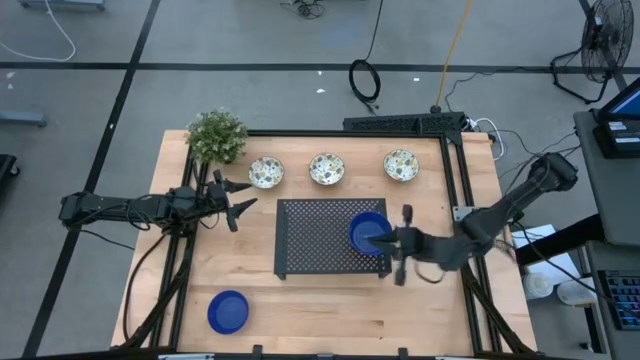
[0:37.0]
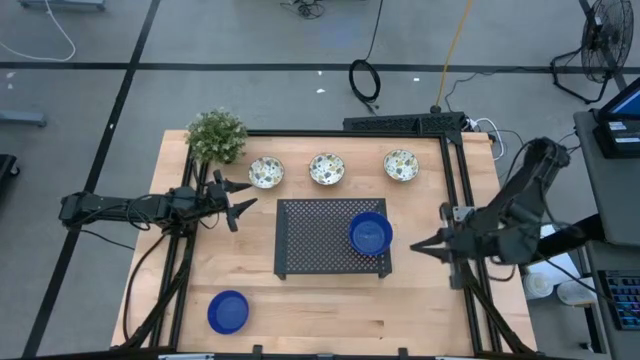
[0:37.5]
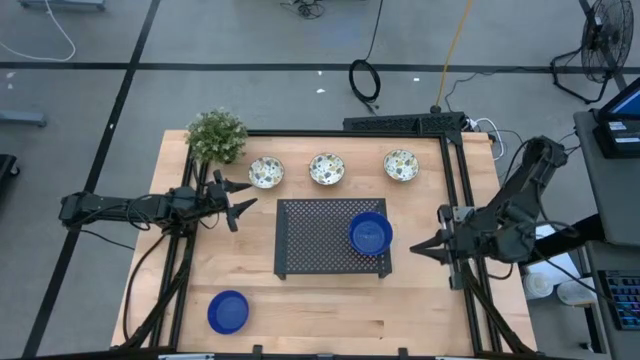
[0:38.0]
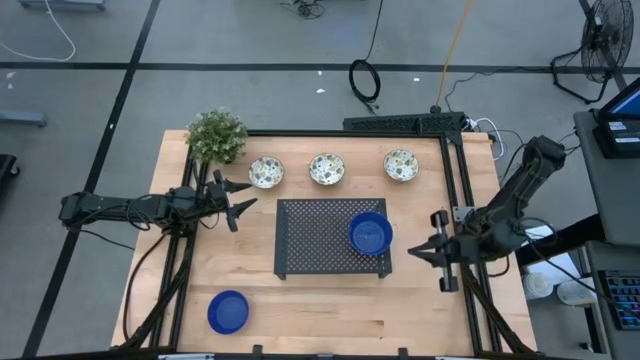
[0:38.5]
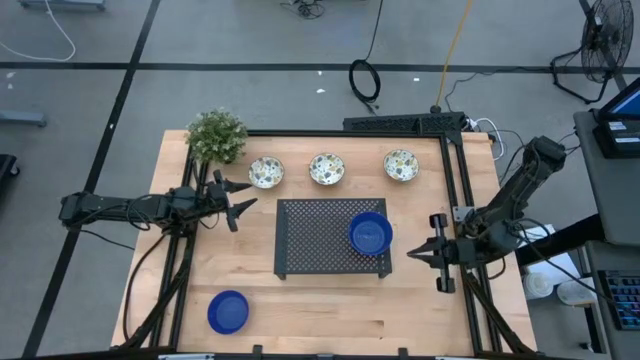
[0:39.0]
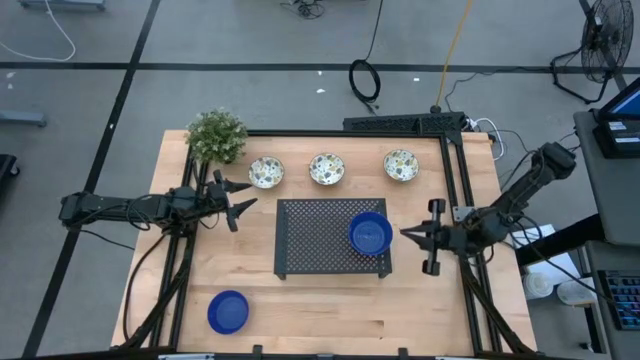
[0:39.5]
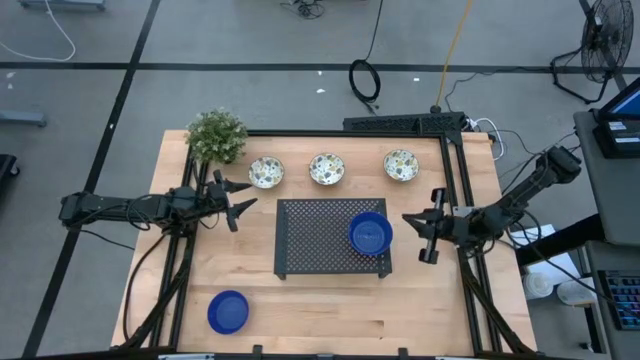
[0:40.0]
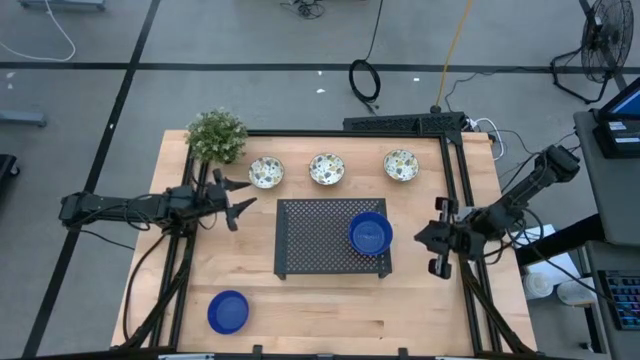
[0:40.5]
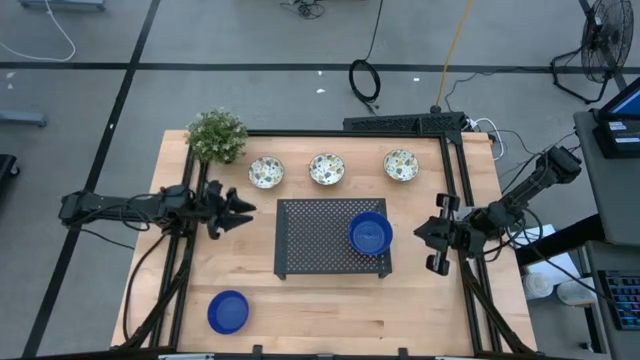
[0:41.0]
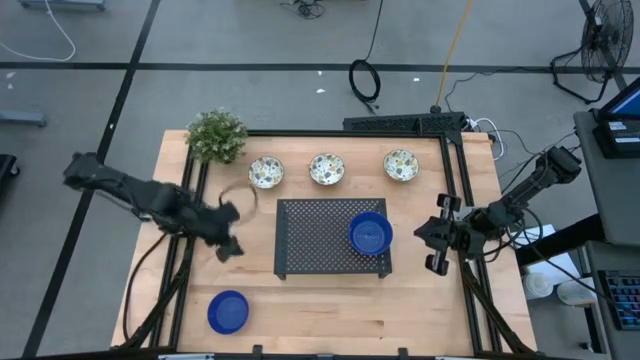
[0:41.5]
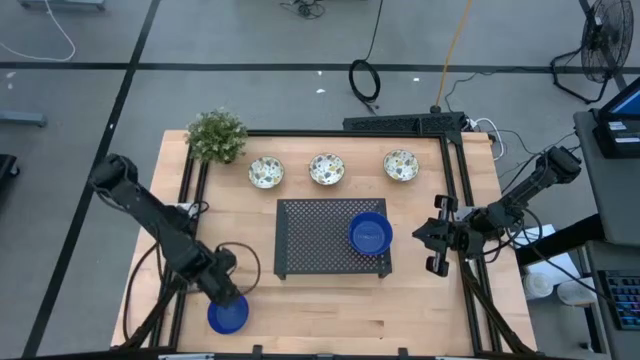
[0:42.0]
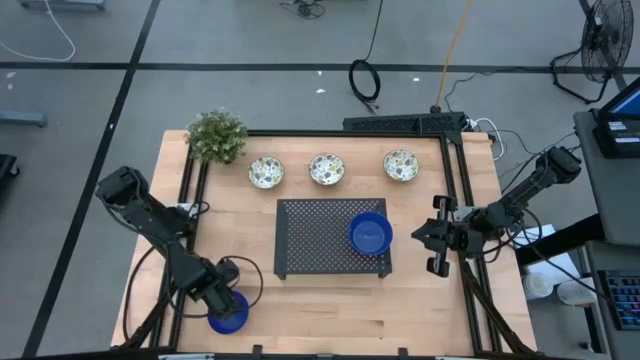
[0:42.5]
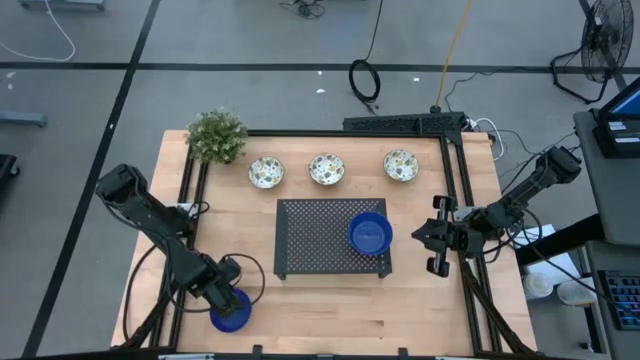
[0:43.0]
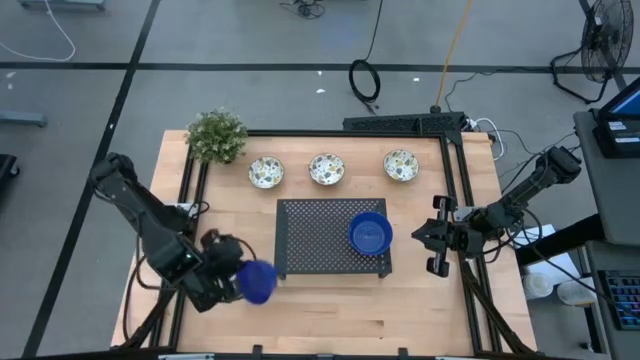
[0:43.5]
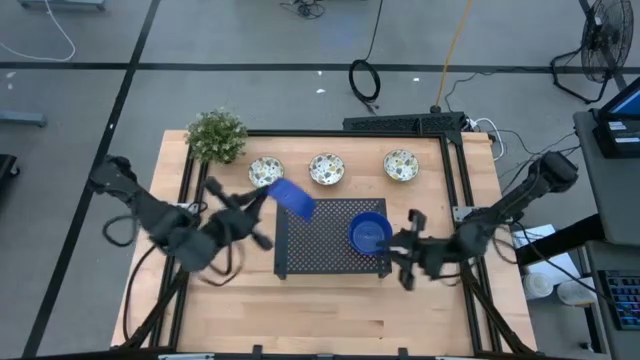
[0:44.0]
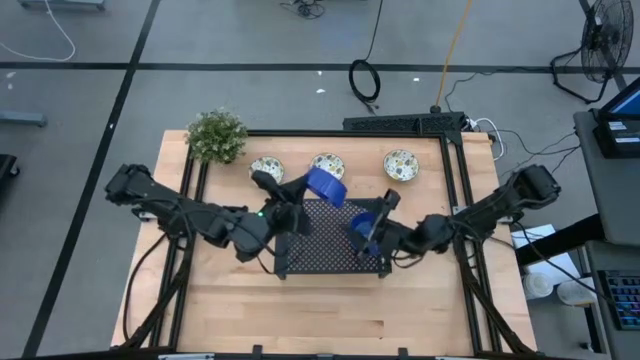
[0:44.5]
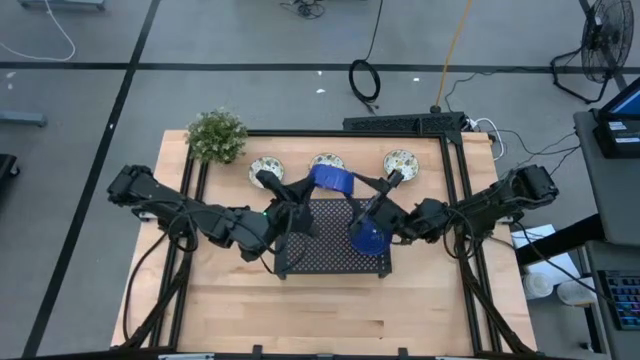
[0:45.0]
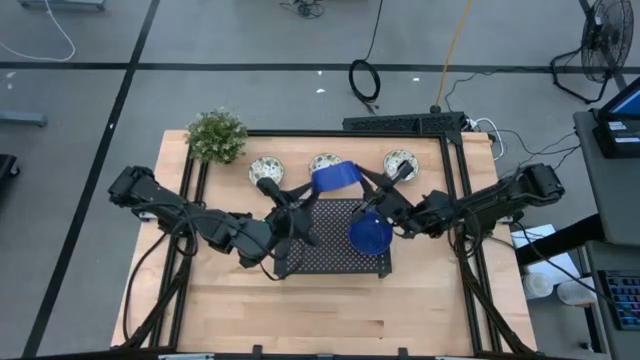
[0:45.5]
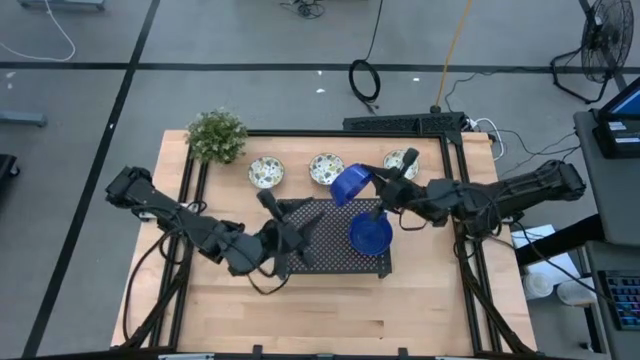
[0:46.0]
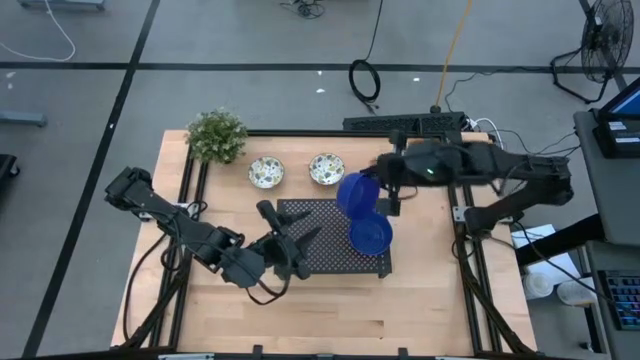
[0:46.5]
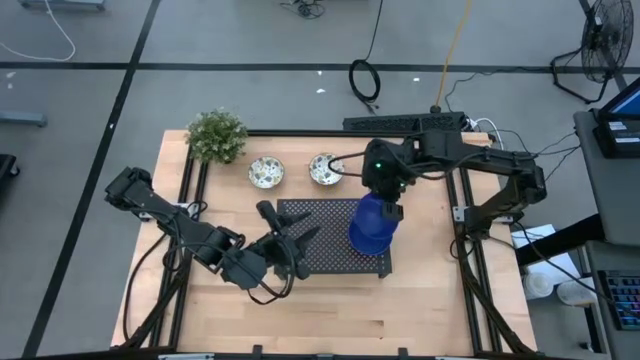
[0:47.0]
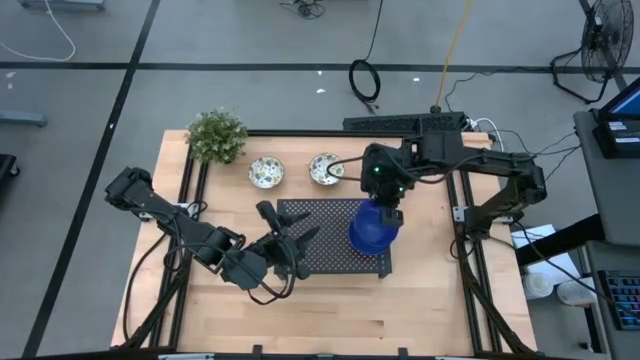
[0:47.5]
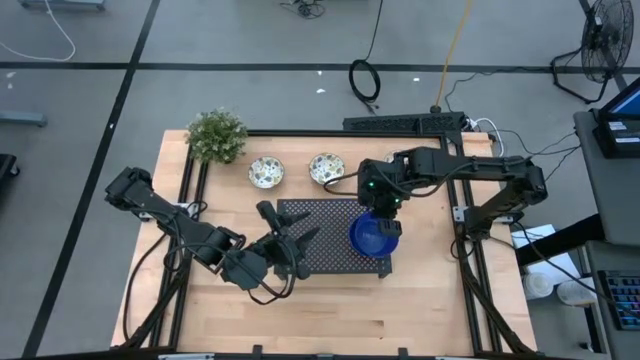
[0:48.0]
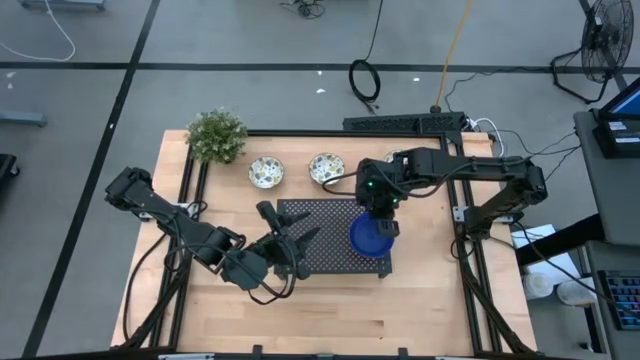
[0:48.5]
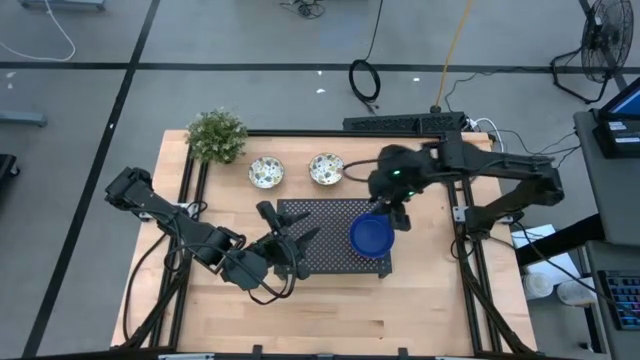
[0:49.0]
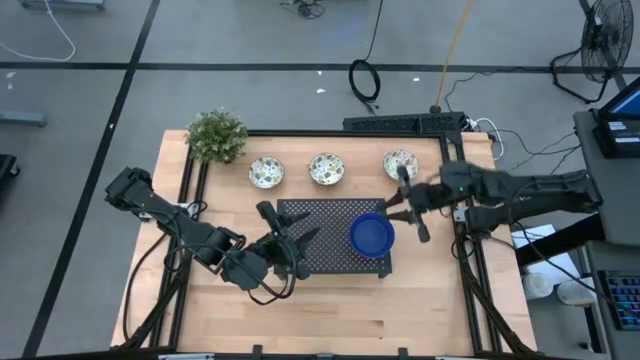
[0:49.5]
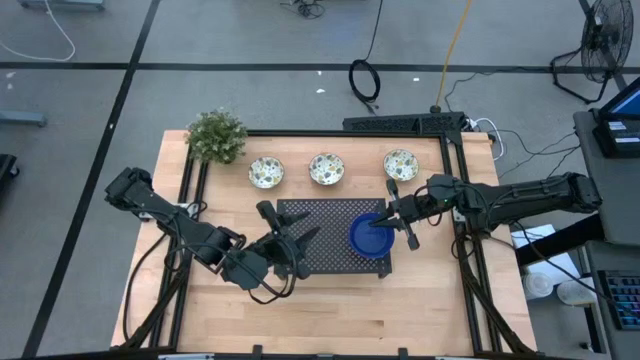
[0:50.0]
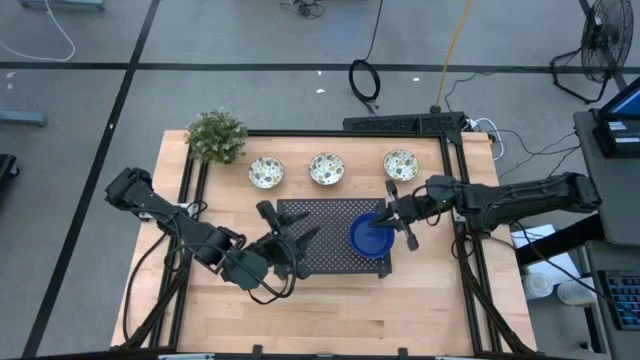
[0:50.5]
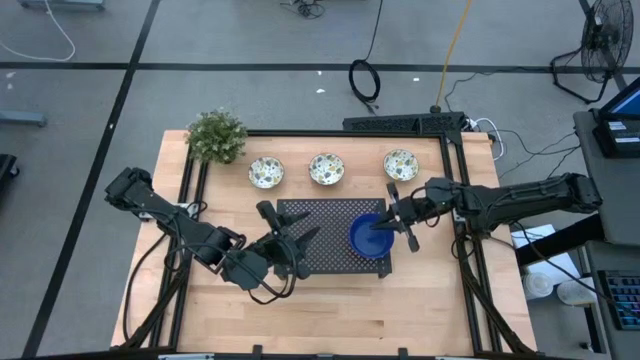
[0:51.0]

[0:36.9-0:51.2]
Task: Pick & Place Mini bowls
Stack the blue bowl on the stacked blue bowls on the shelf

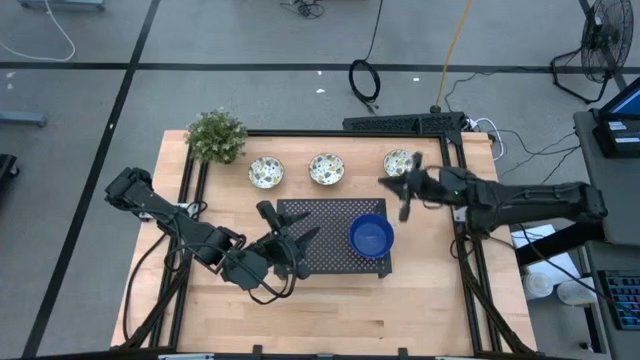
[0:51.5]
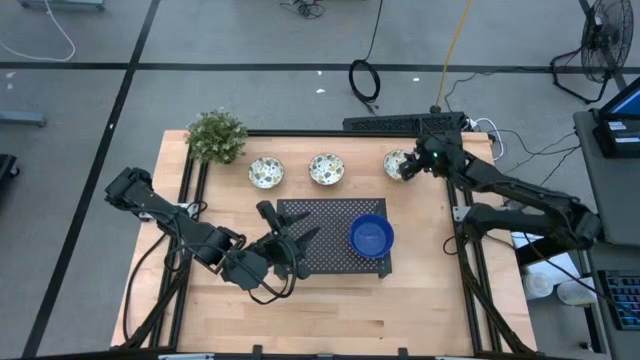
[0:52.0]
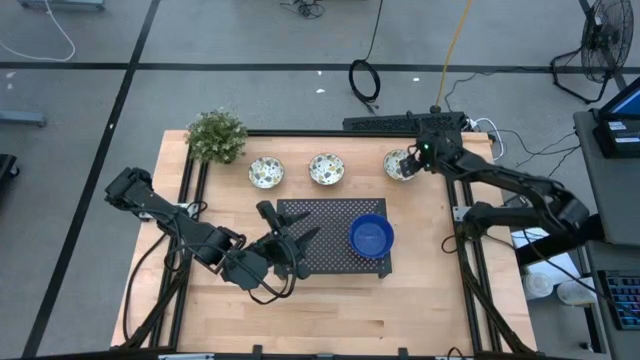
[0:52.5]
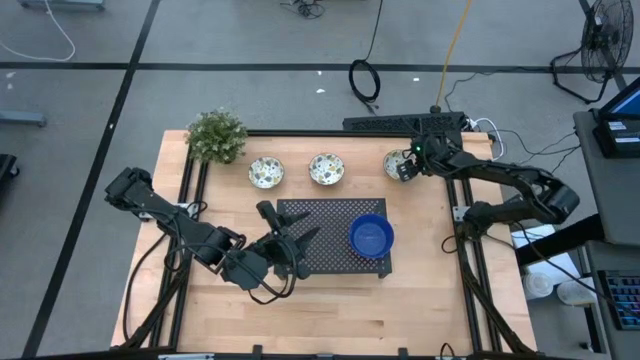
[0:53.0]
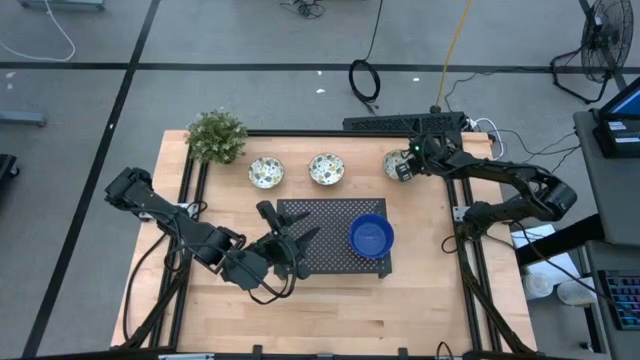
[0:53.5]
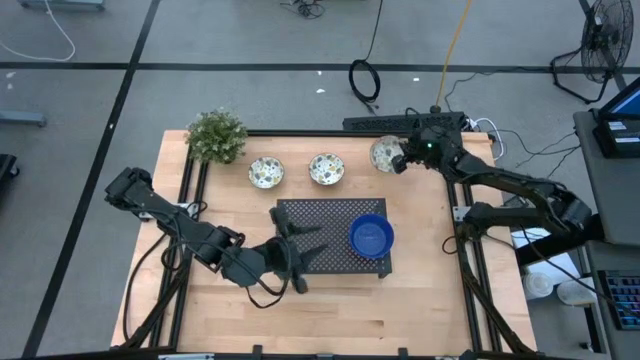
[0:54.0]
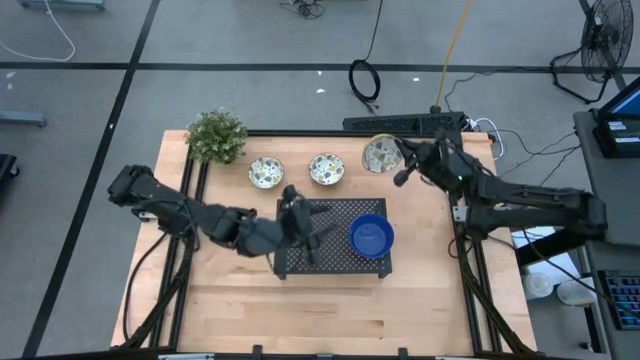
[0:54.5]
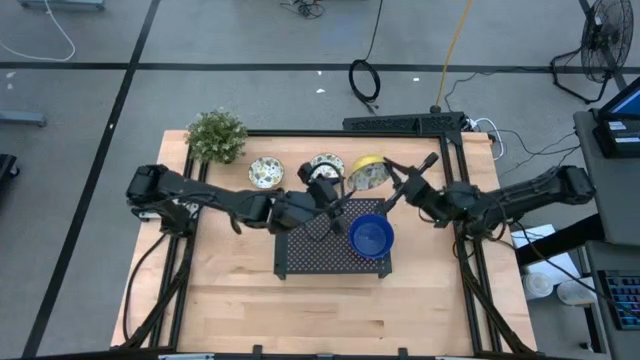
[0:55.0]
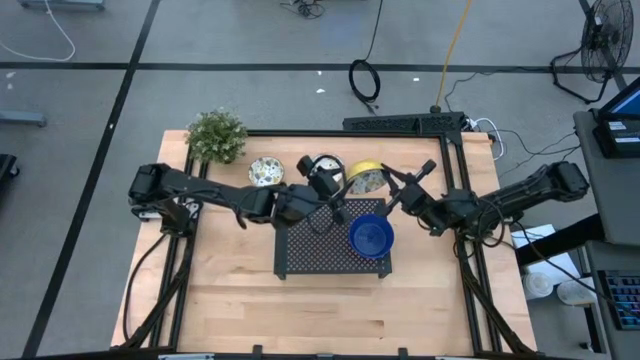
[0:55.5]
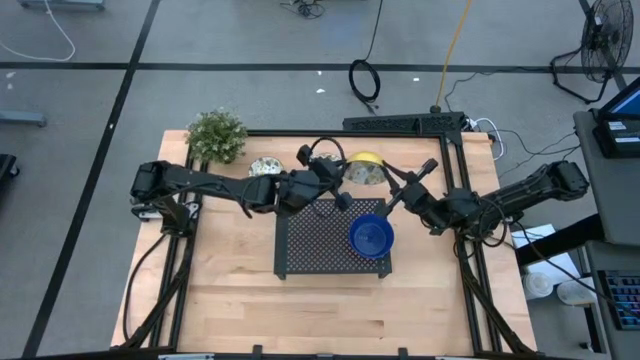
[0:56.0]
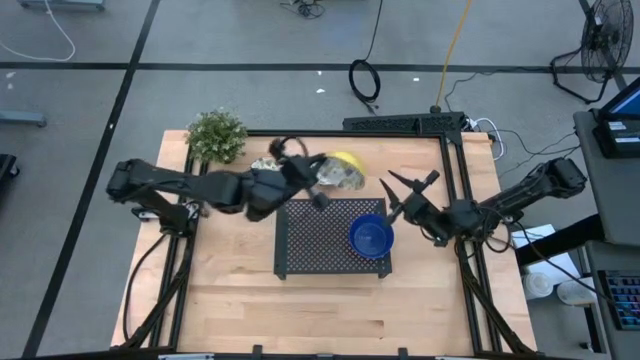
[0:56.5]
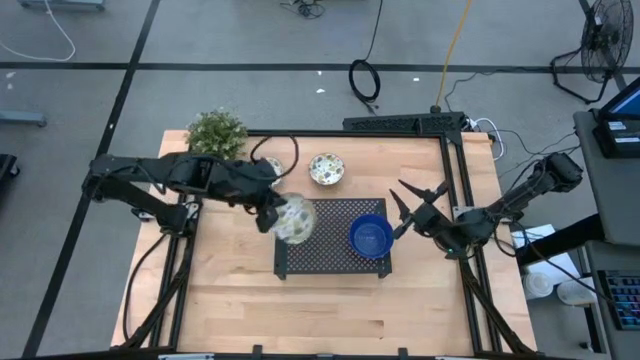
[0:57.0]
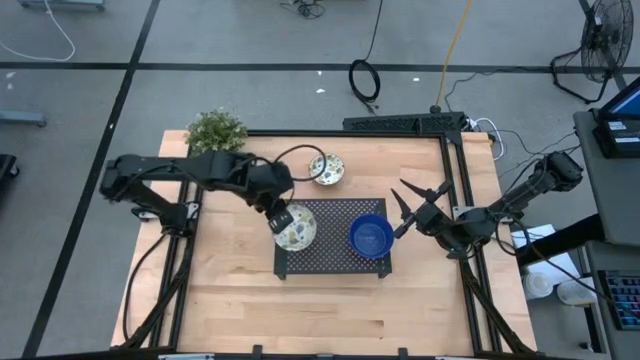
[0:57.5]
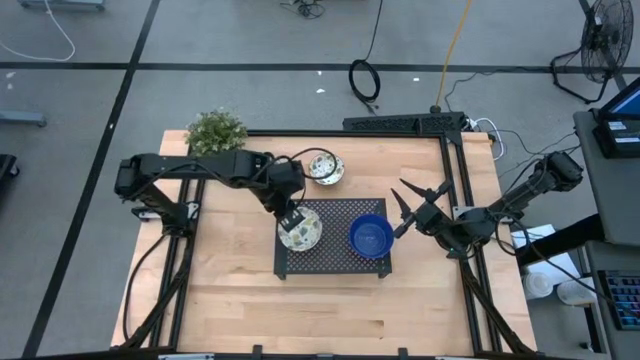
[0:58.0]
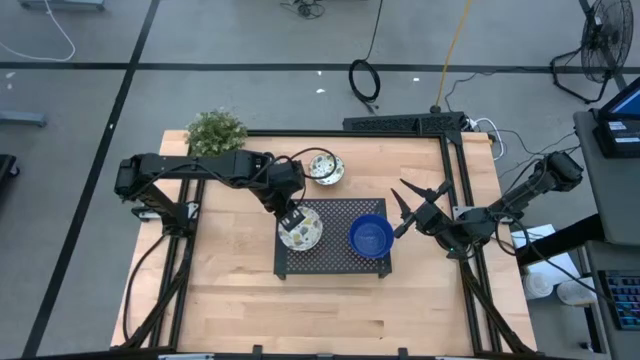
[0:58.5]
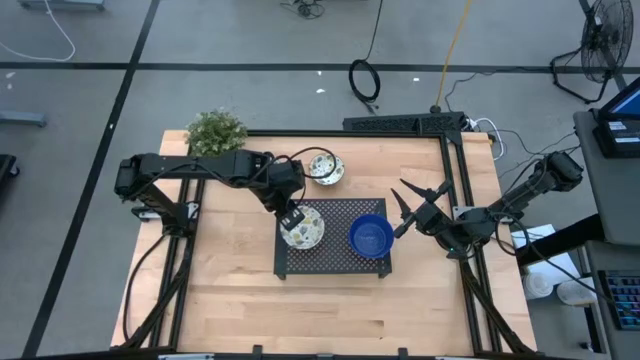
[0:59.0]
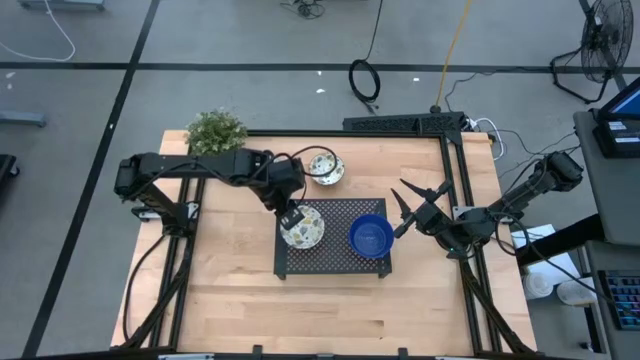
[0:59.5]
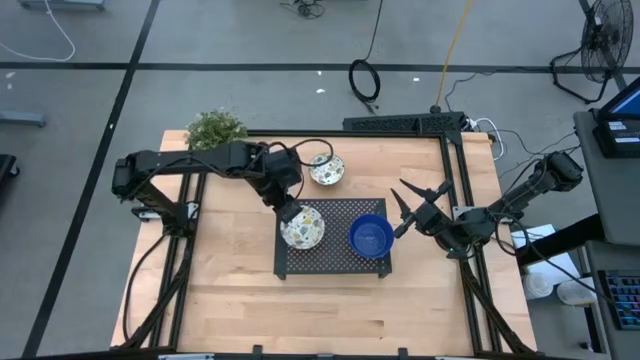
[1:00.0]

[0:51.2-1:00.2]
Put the right white bowl on the shelf
